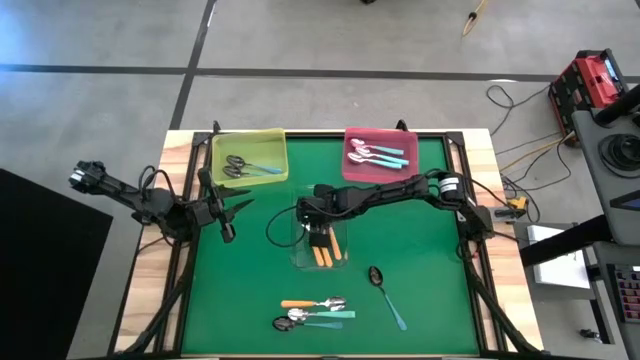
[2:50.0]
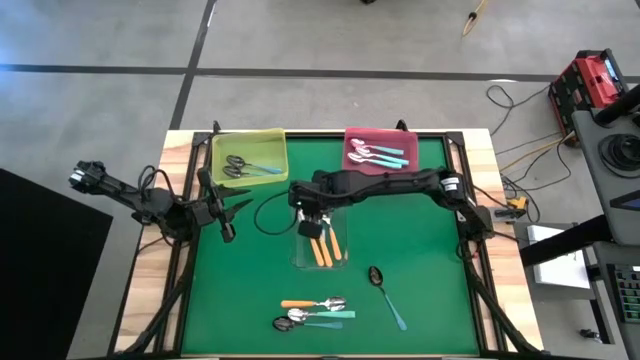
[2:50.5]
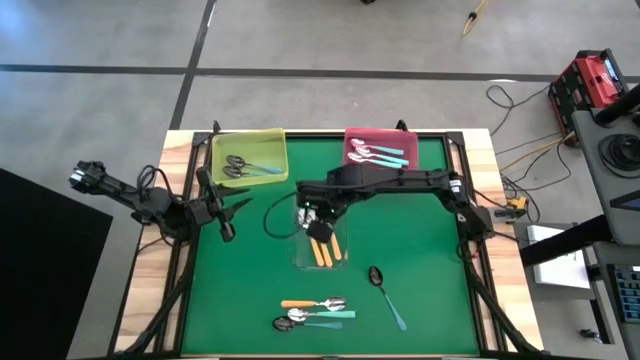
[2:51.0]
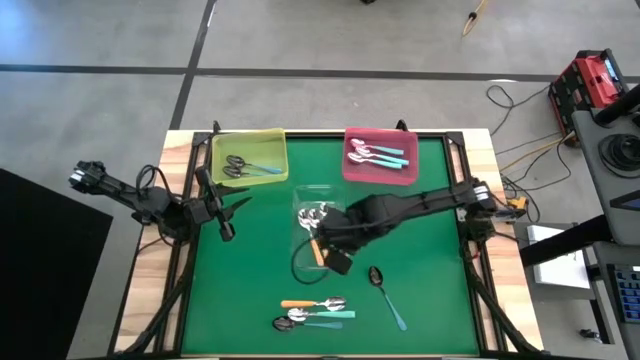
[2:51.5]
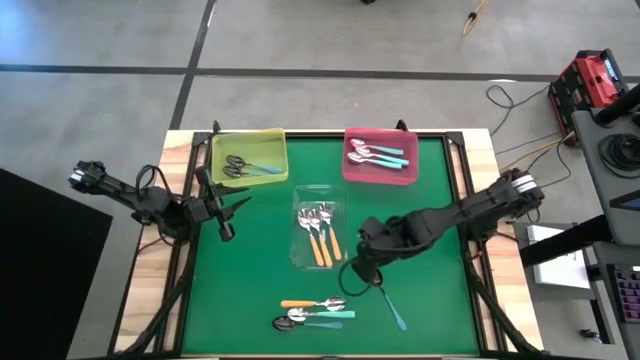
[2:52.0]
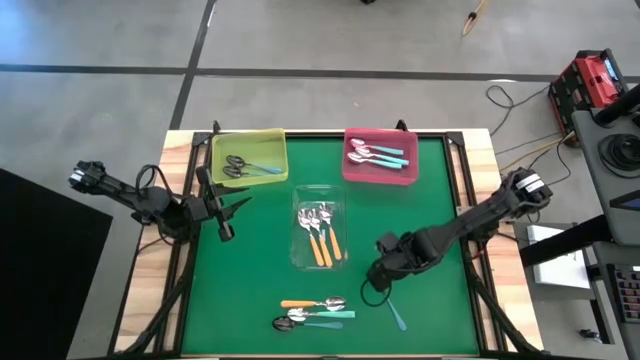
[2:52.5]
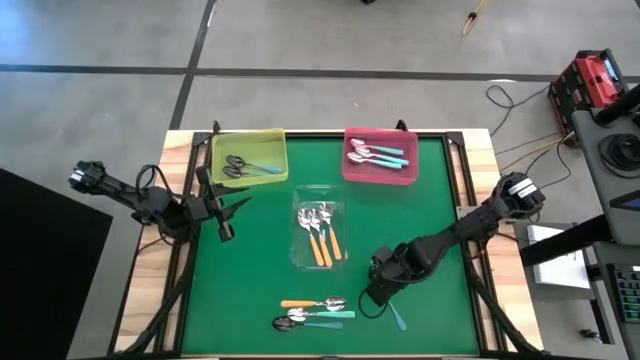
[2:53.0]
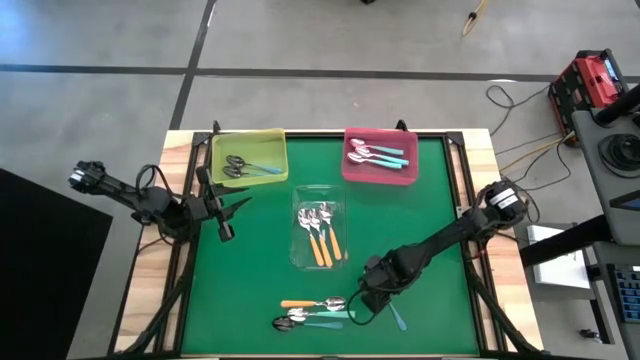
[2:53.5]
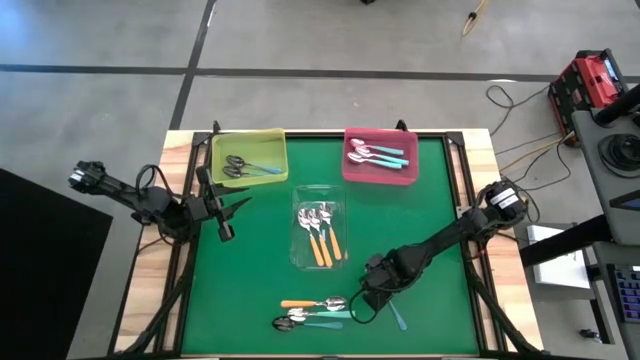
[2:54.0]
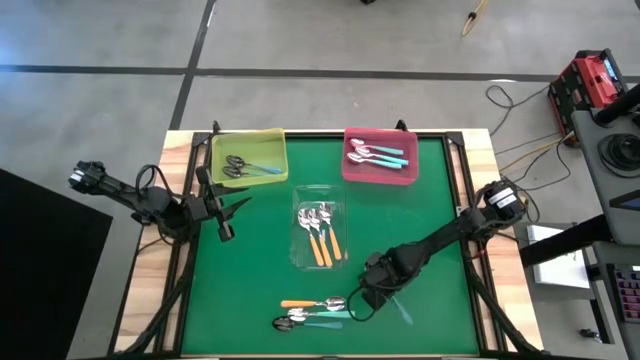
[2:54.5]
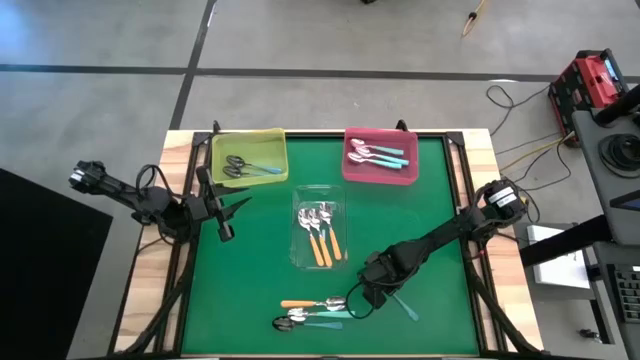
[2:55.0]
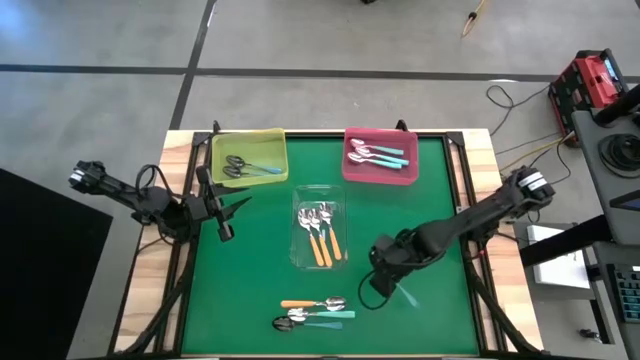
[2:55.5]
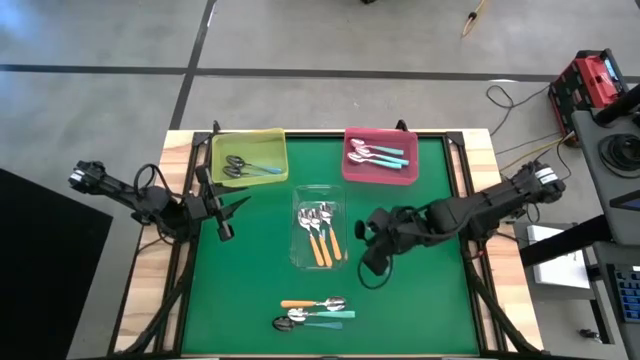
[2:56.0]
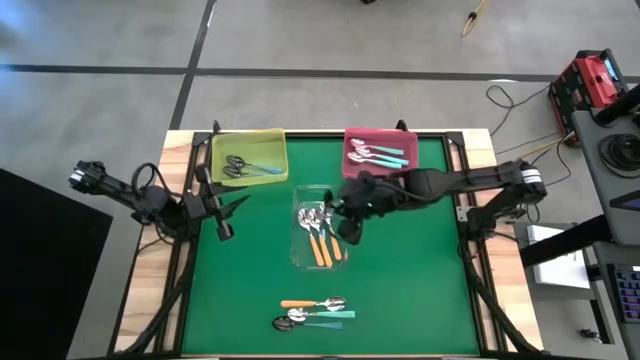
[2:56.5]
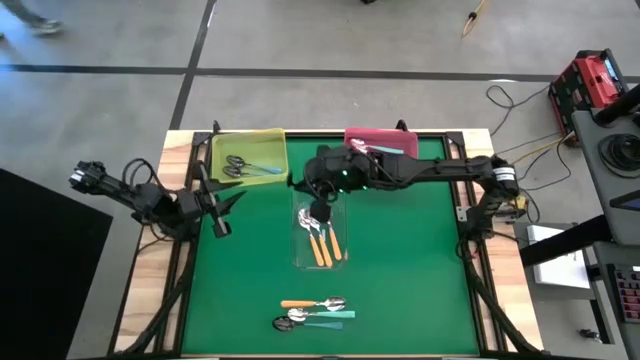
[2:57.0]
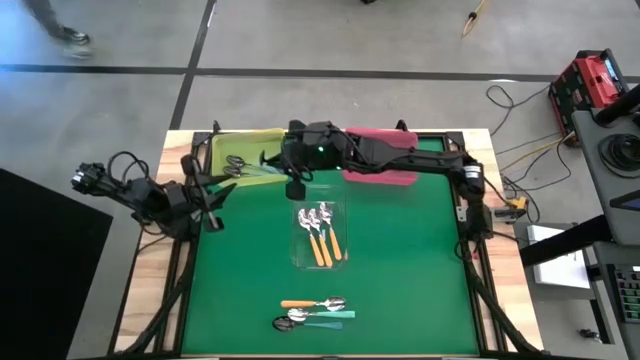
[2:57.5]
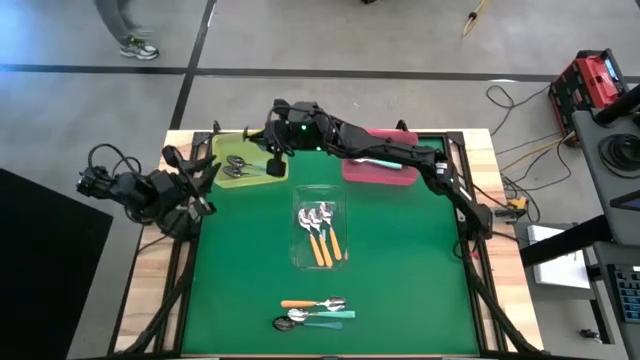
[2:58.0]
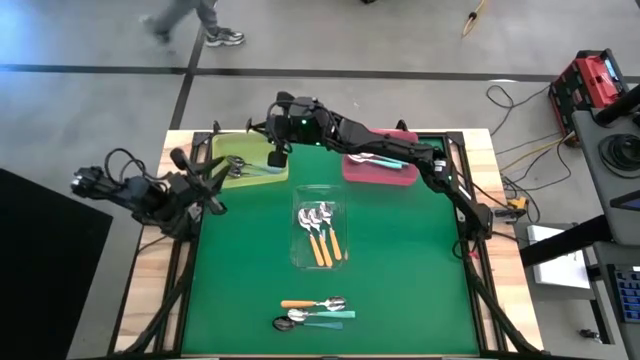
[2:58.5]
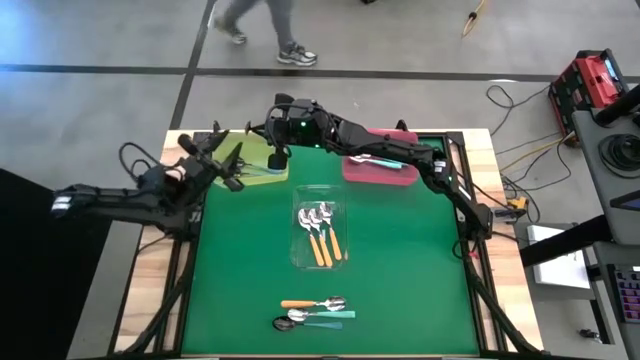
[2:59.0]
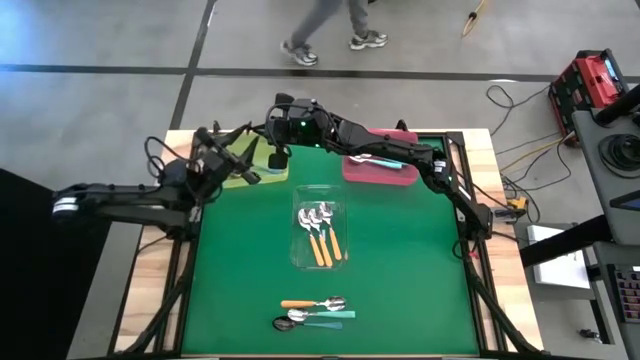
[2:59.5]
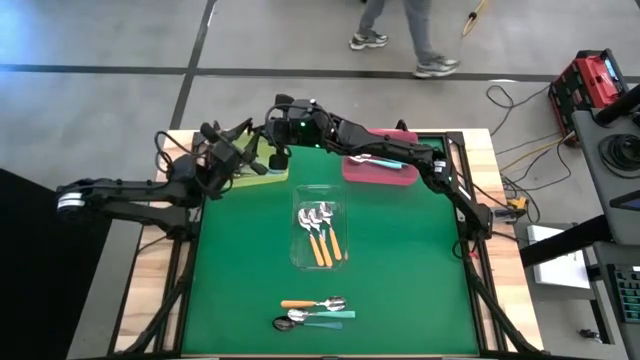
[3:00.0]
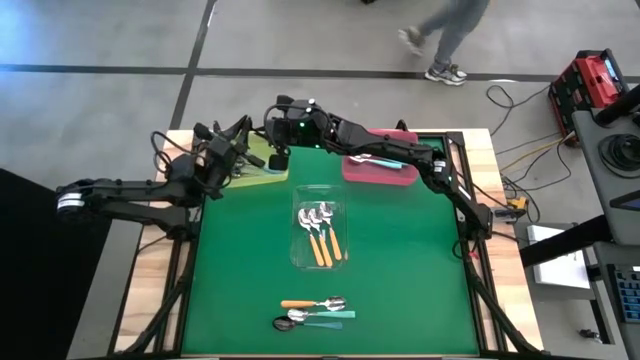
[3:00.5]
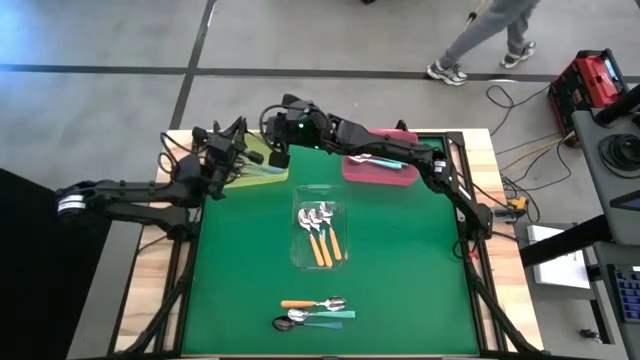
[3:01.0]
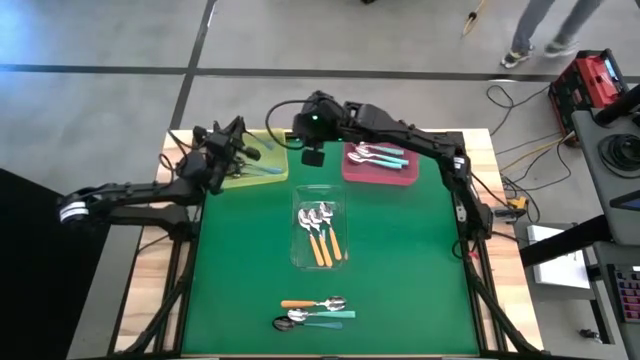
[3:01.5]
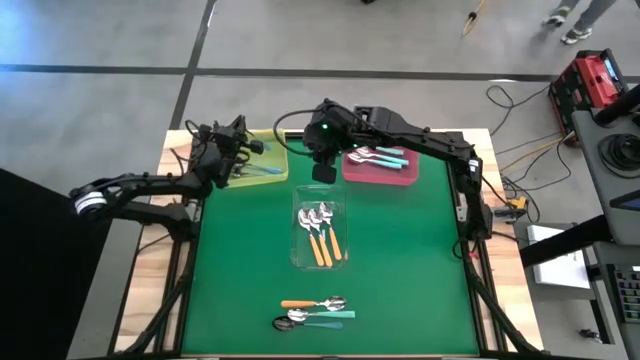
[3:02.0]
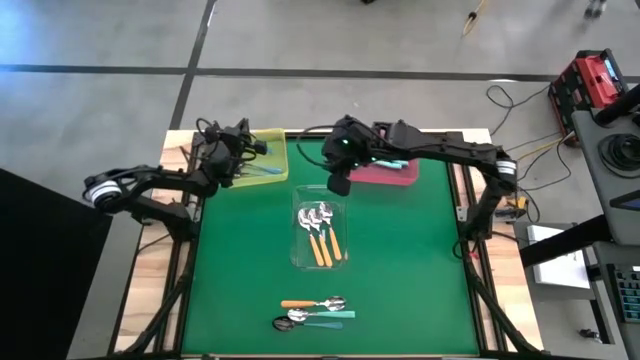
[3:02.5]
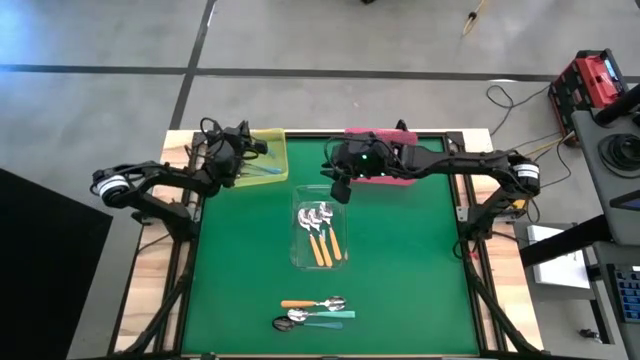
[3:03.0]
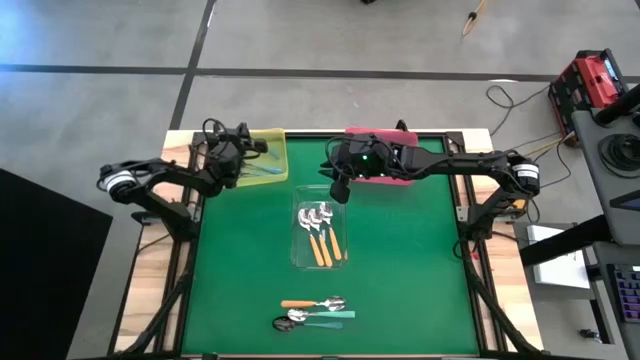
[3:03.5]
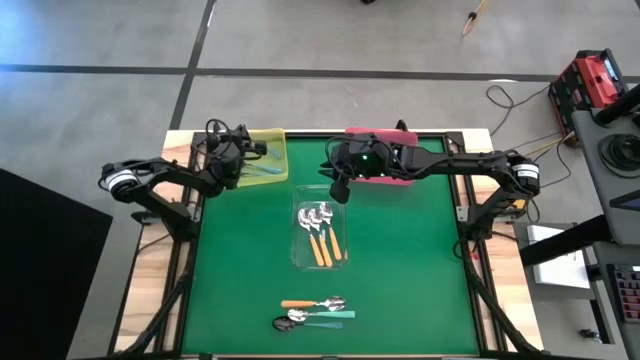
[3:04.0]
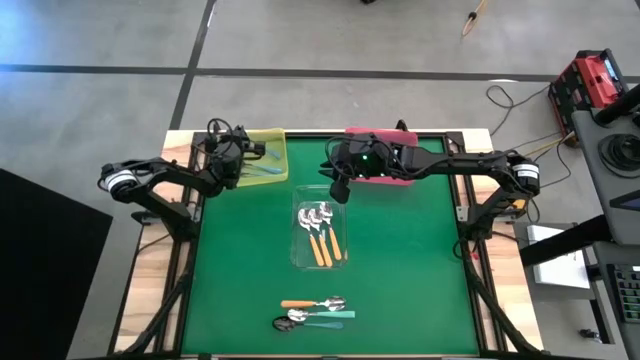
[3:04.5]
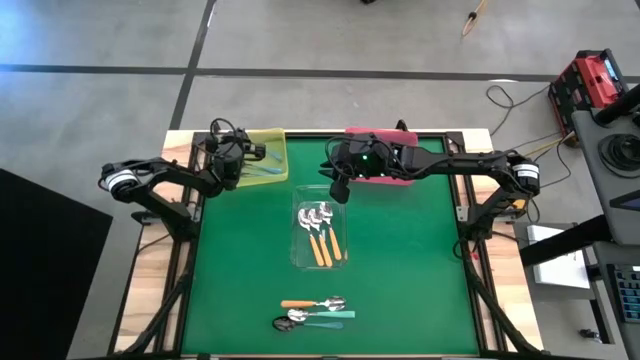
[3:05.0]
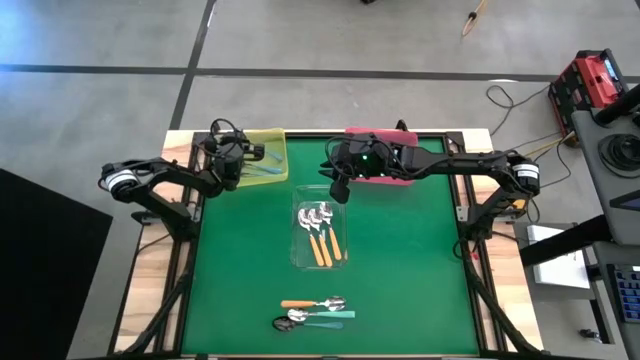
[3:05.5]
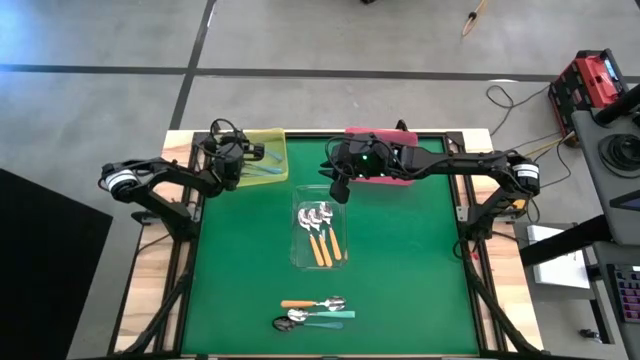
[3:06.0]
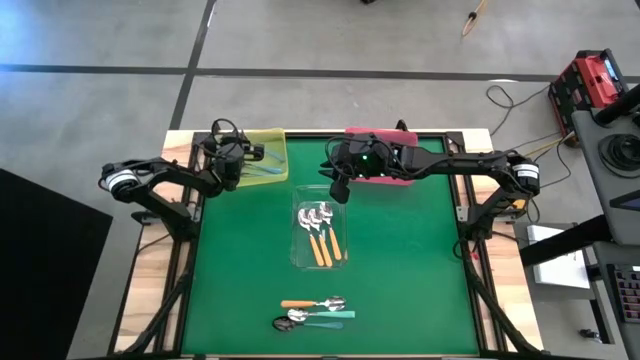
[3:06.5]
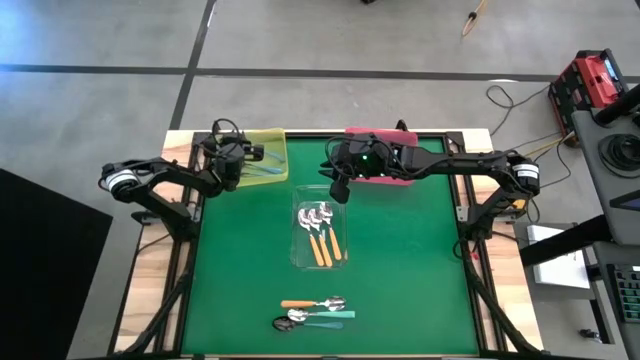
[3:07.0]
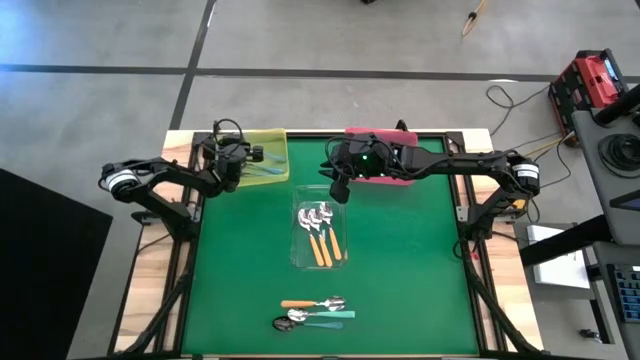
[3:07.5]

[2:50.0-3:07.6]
Task: Sort silverware by color (type)
Put the right blue spoon into the yellow bin

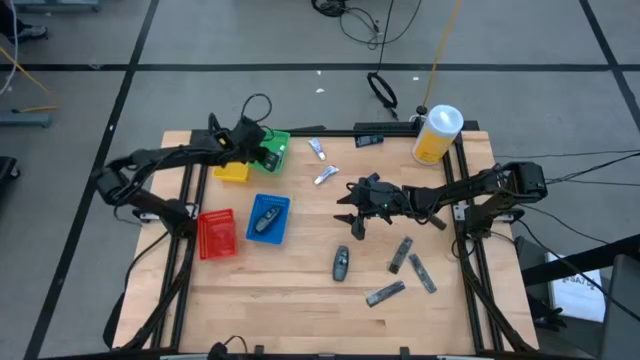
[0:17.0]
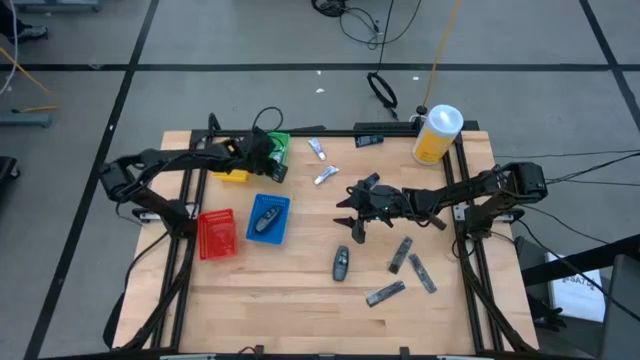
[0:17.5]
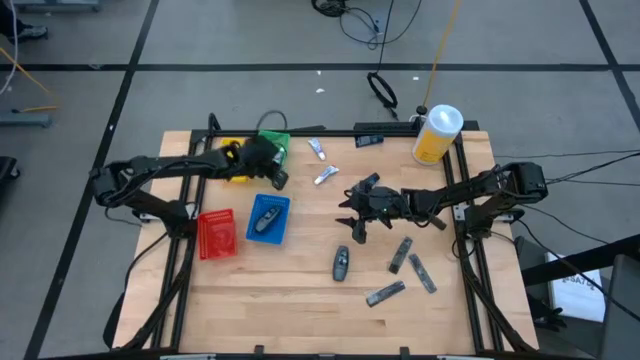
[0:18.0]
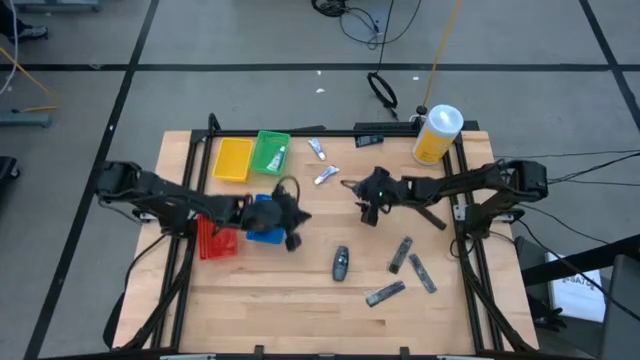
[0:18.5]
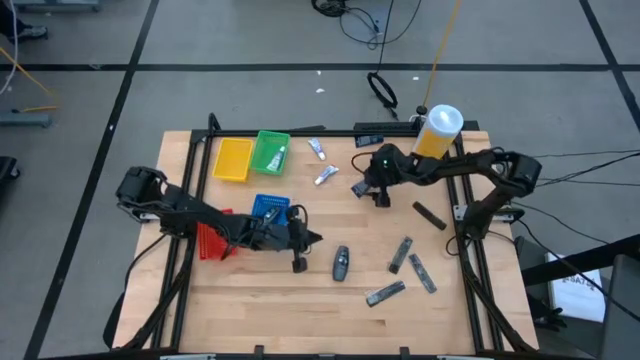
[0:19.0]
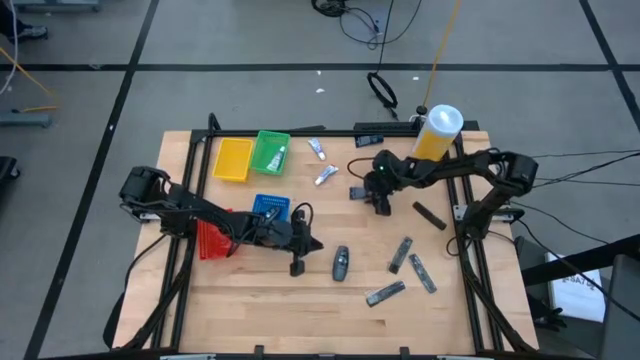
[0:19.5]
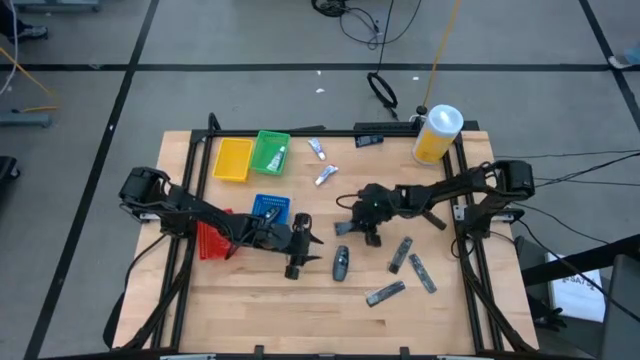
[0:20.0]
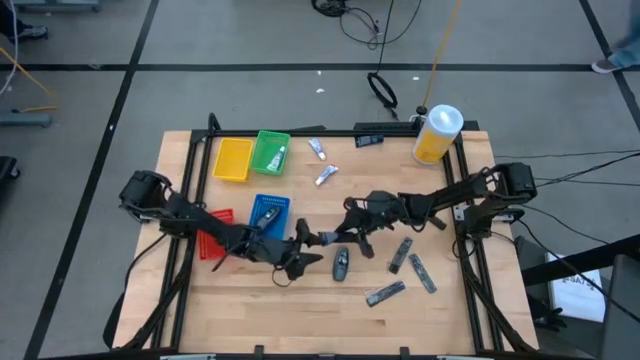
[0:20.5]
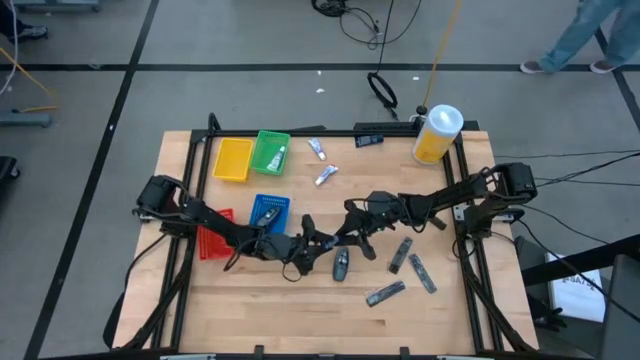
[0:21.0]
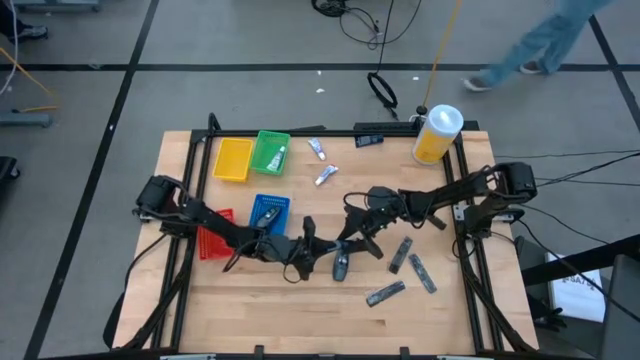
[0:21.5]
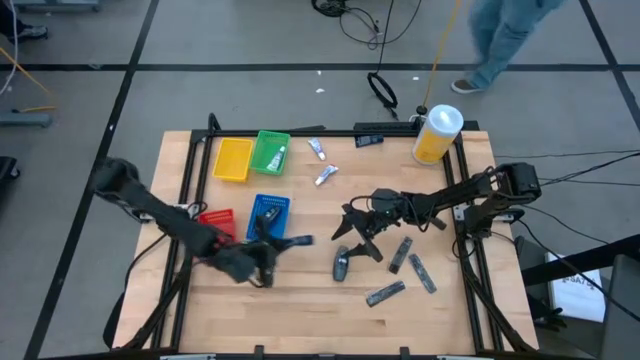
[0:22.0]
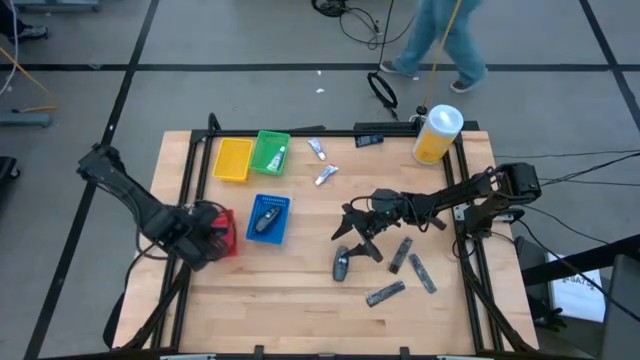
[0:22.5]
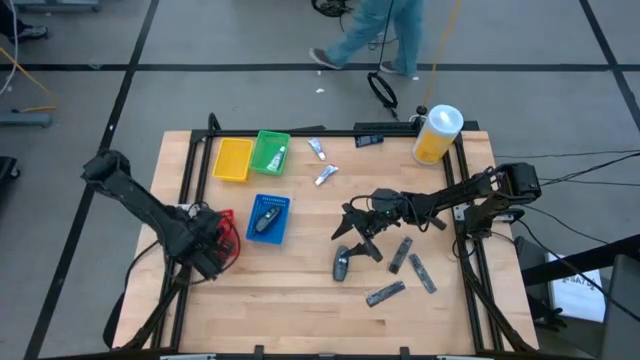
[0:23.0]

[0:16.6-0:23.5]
Task: Pick & Place Travel size toiletries
Put the blue shaving cream into the red bin
